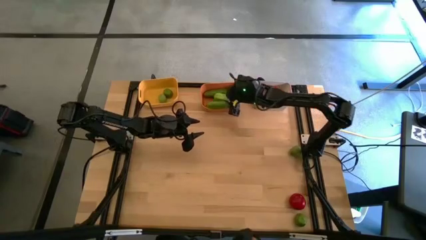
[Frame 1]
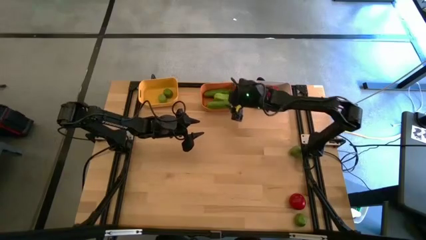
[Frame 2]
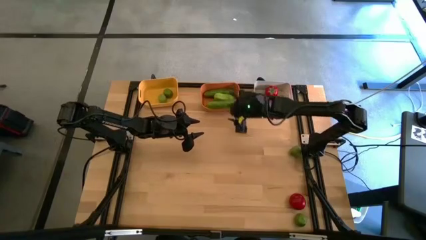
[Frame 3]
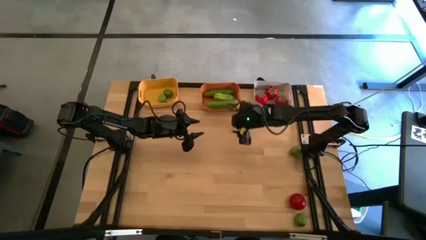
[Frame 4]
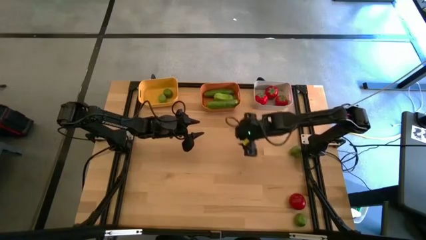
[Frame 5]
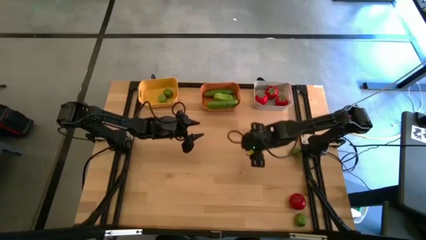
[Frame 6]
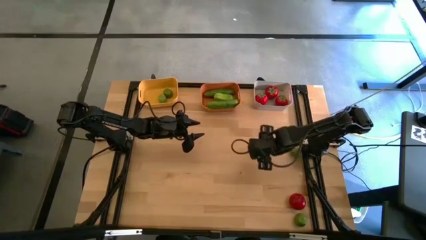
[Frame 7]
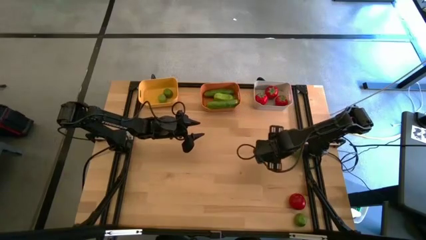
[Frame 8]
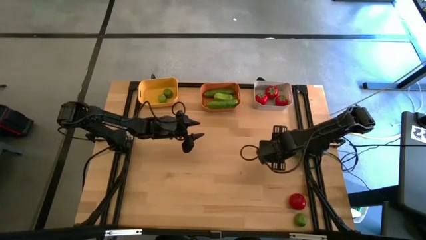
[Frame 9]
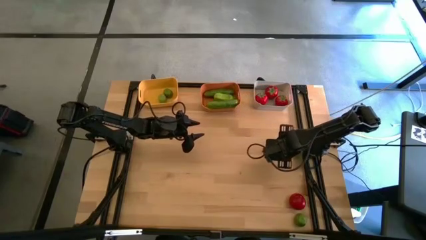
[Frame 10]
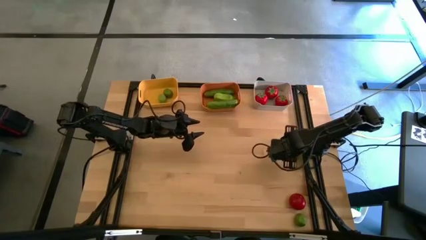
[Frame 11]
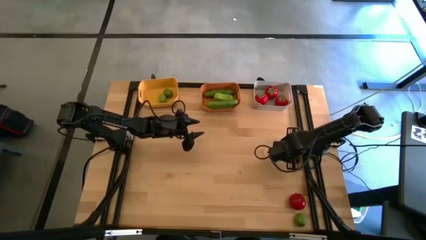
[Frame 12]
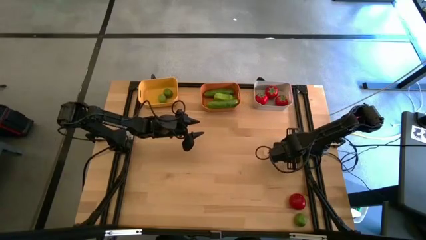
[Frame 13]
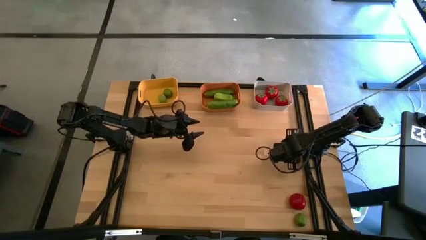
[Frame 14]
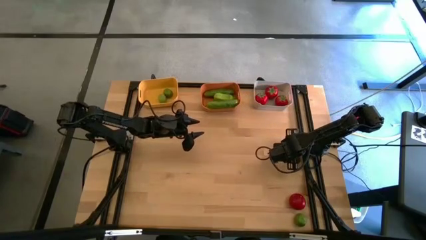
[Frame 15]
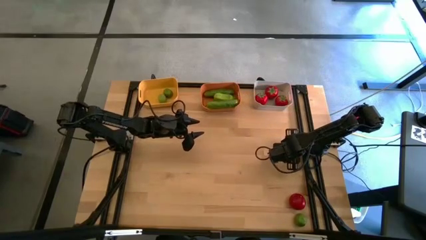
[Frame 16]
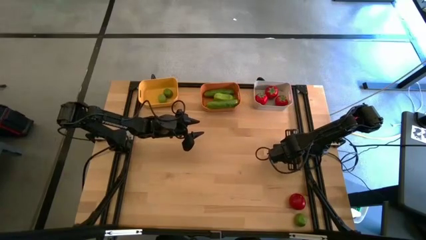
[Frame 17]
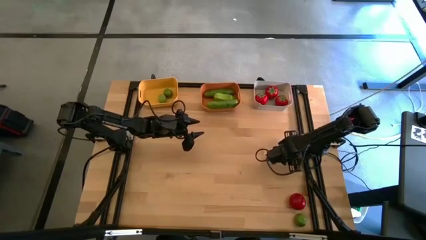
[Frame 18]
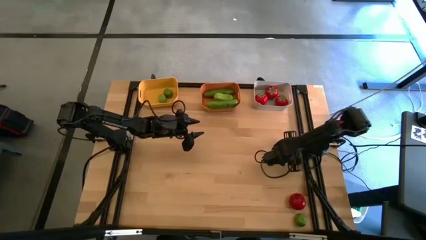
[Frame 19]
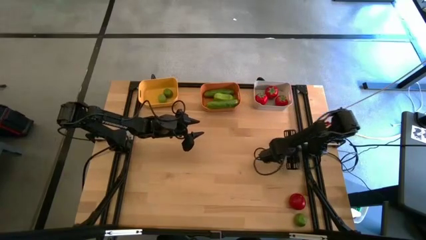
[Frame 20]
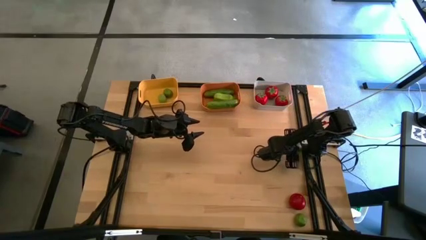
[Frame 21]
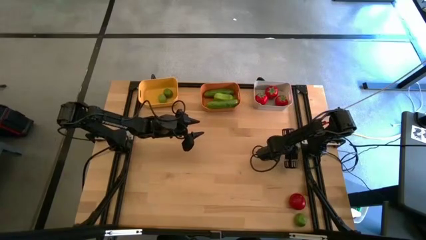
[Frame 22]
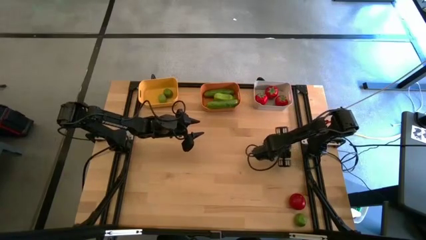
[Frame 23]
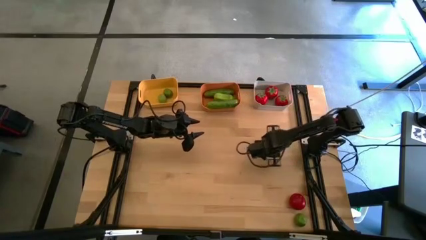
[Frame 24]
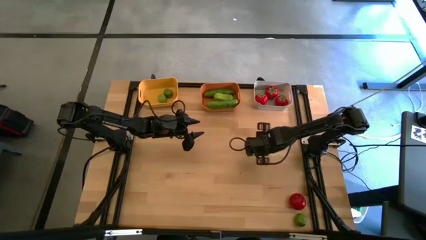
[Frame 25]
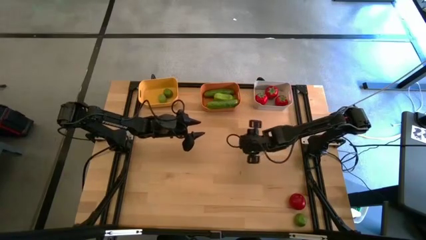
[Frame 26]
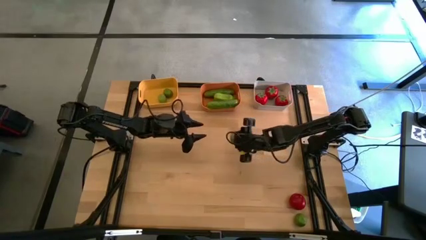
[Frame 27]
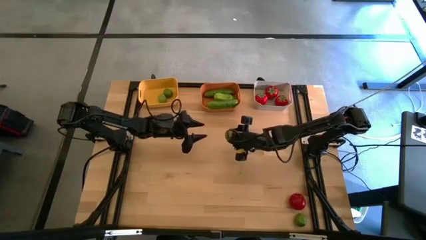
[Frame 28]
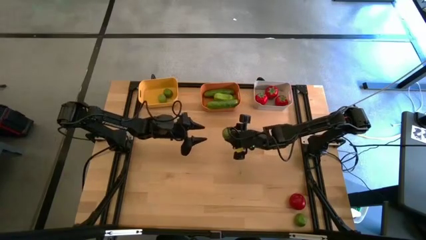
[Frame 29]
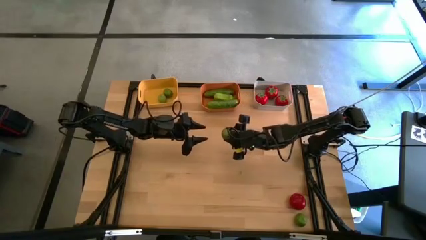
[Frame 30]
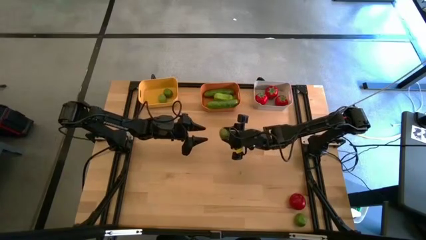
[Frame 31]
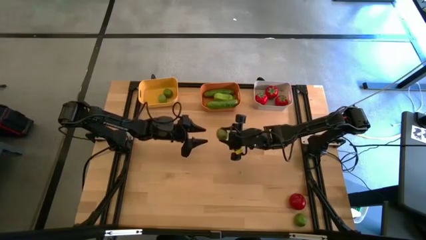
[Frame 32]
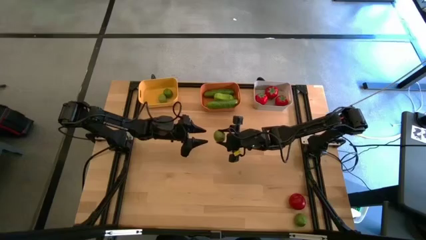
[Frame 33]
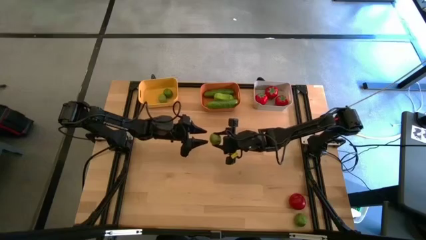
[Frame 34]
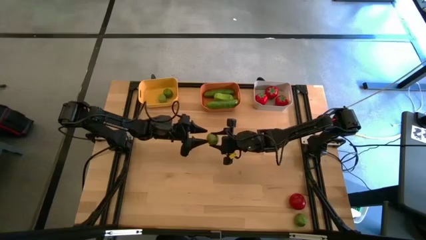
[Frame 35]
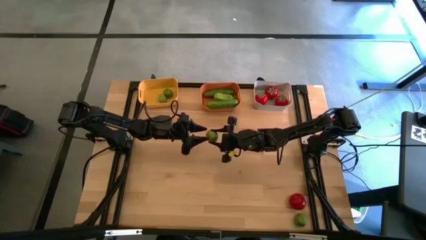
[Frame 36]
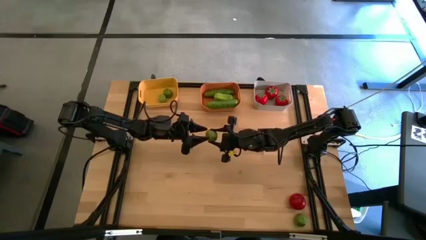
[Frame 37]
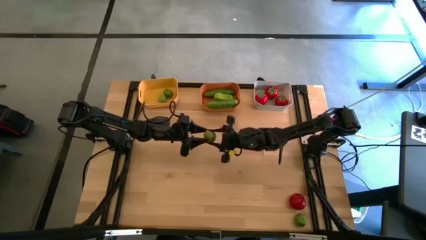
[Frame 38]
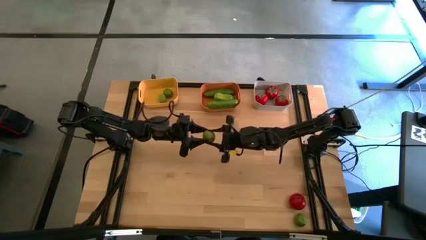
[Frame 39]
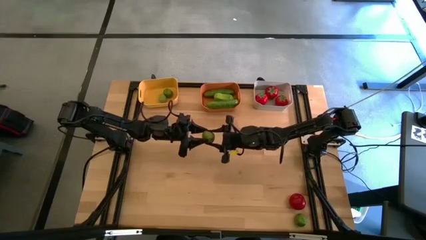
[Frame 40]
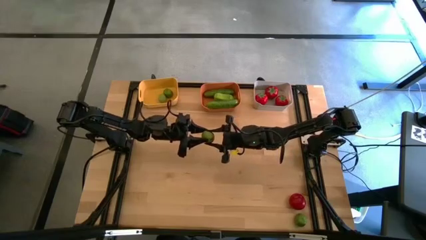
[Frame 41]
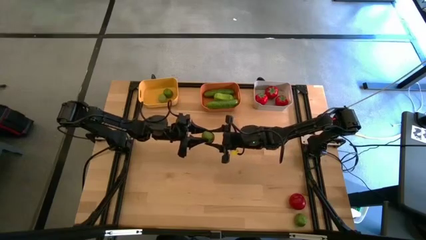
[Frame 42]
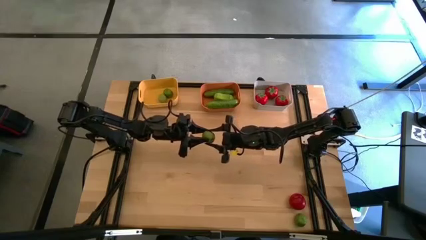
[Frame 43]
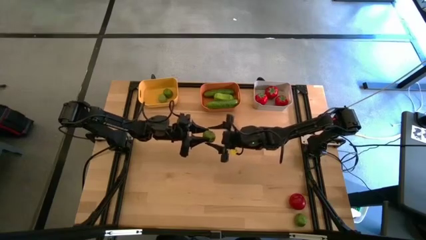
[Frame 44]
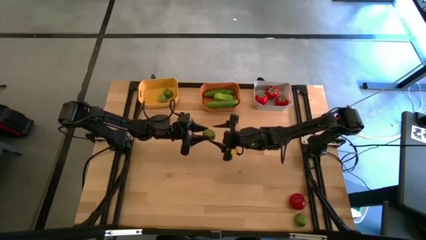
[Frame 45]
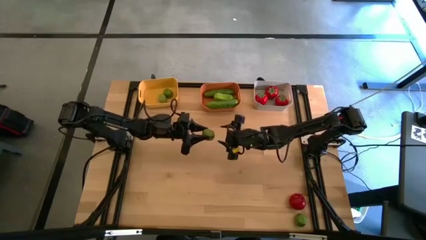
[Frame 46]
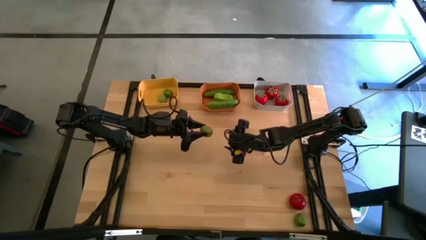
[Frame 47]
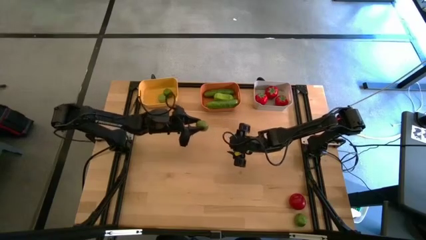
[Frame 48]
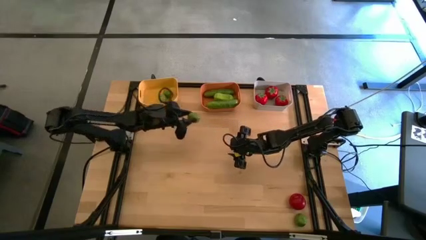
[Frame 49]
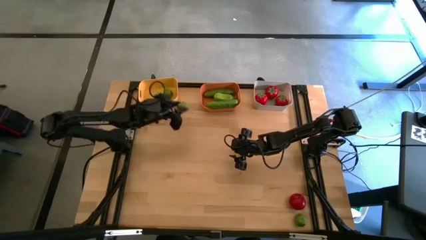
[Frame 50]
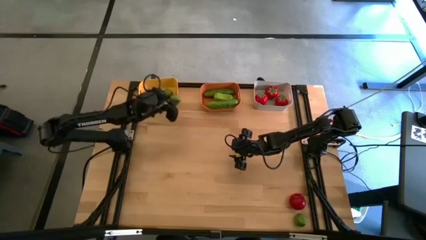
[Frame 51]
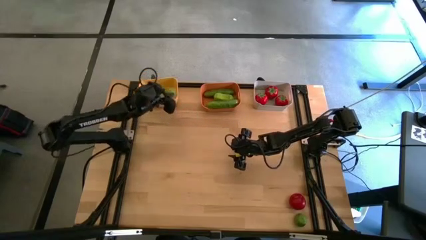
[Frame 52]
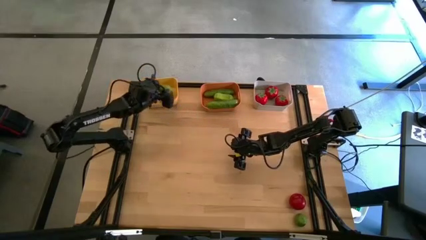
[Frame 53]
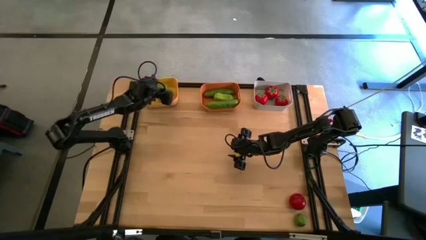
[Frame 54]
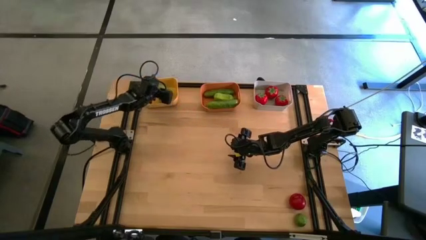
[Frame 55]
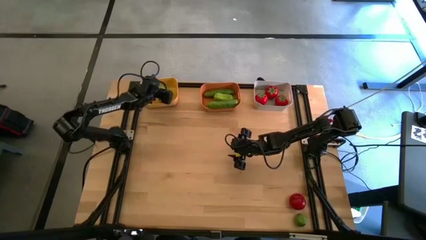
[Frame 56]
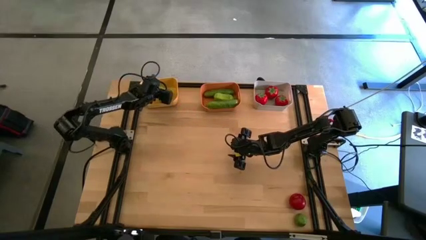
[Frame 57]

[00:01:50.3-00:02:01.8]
Task: Sort produce into baskets
Put the lime into the yellow bin

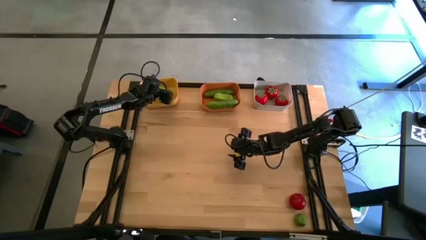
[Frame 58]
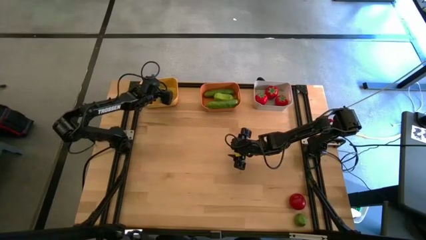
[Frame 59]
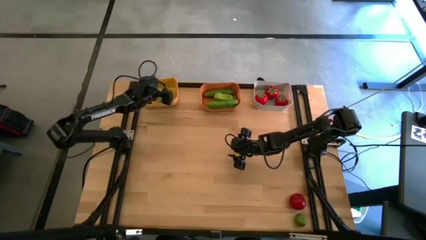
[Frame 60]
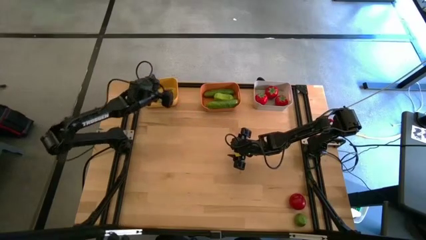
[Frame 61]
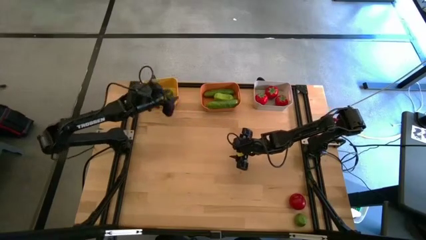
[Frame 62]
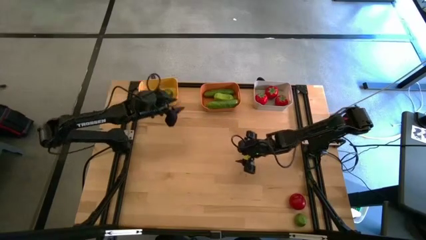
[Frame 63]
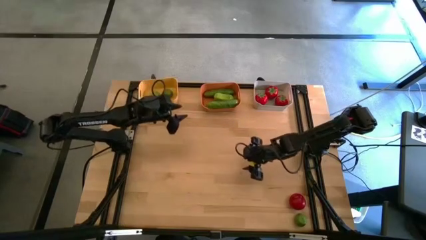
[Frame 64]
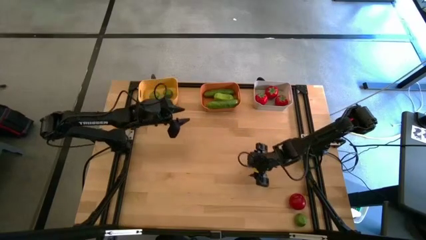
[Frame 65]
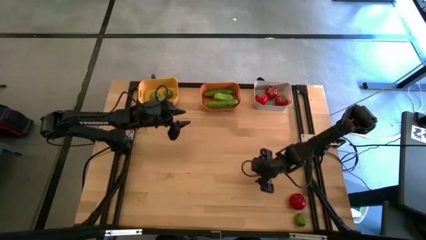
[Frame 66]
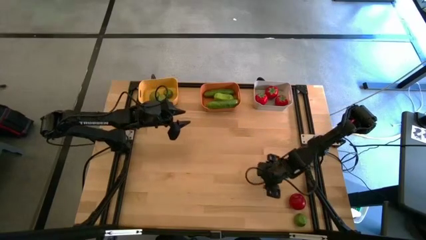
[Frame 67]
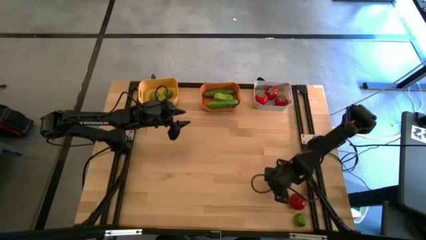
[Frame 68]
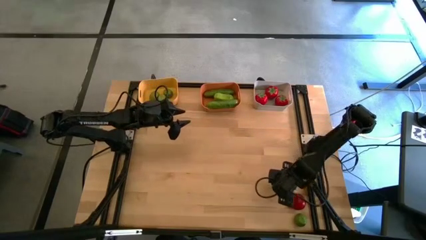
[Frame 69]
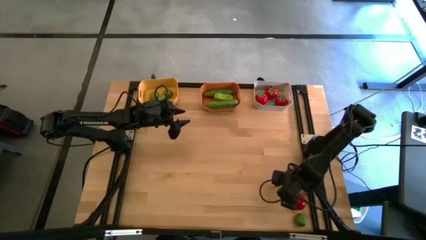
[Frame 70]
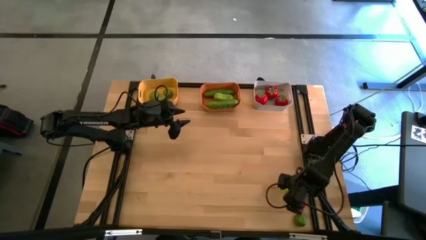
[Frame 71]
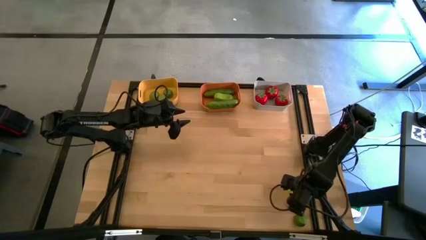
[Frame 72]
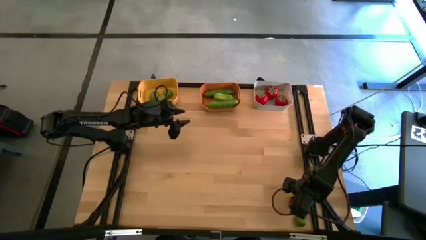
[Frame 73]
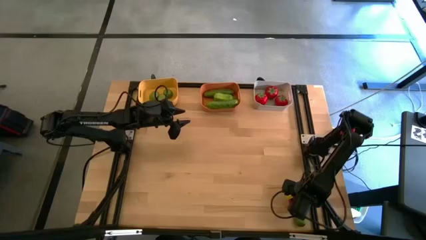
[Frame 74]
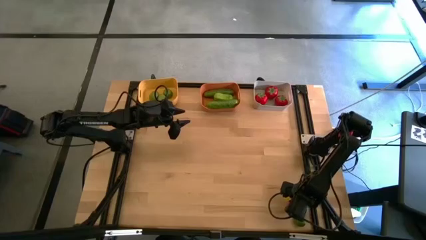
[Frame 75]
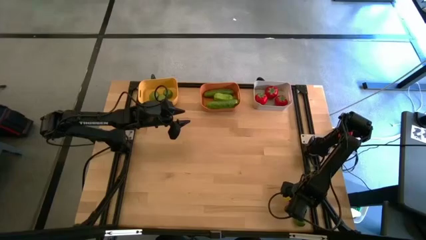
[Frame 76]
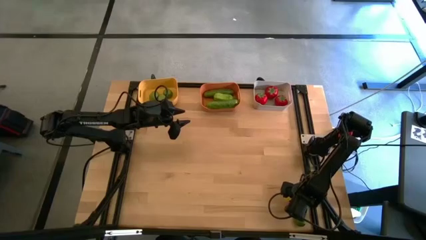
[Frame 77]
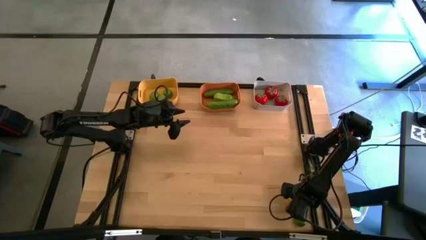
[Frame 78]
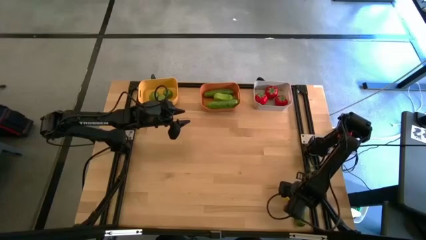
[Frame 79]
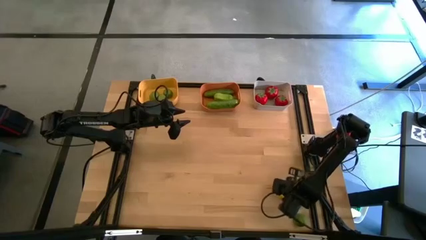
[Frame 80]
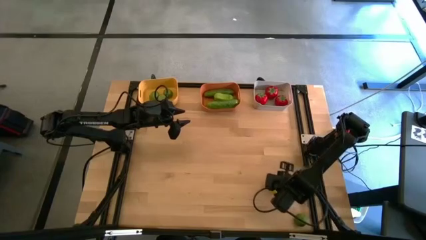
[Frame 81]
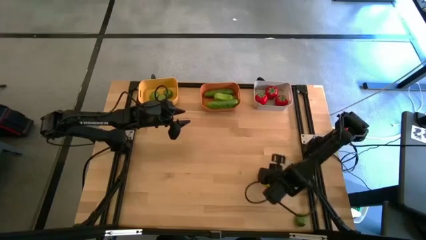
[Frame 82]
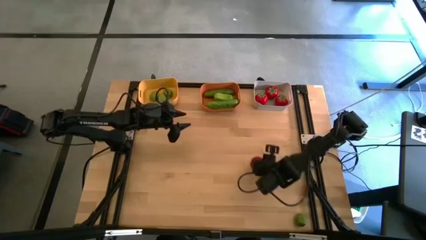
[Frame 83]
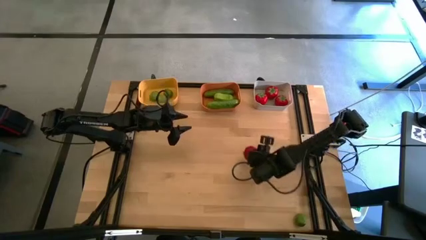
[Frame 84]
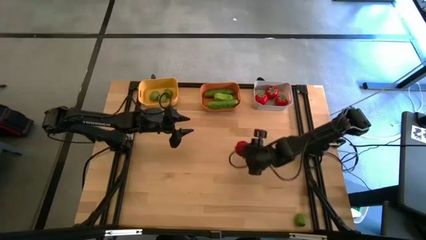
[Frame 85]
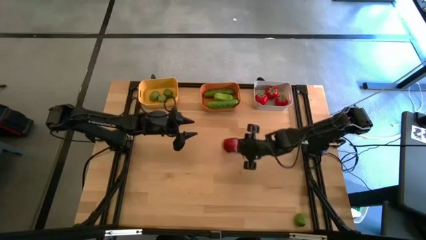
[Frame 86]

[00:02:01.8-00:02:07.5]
Put the tomato into the white bin
